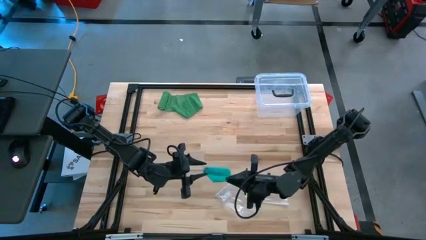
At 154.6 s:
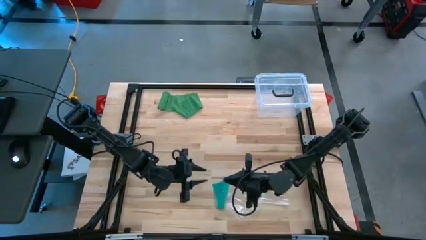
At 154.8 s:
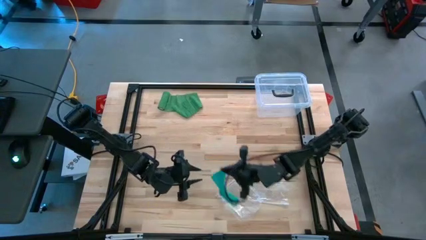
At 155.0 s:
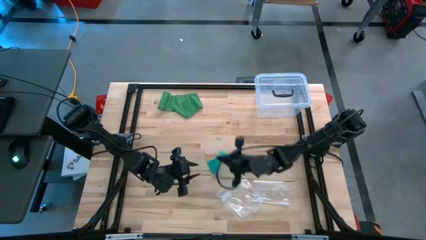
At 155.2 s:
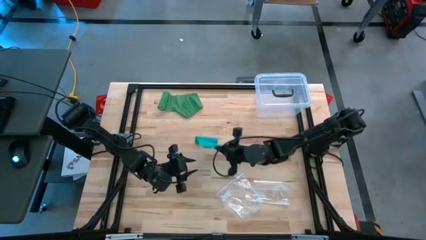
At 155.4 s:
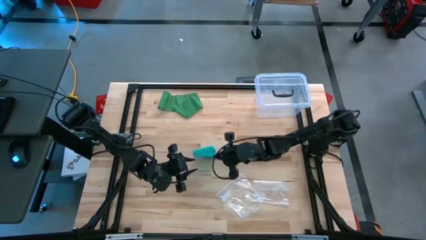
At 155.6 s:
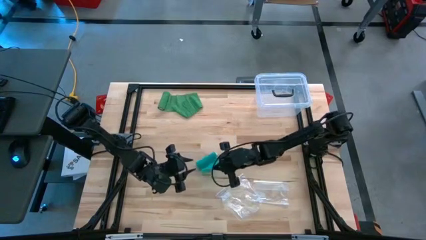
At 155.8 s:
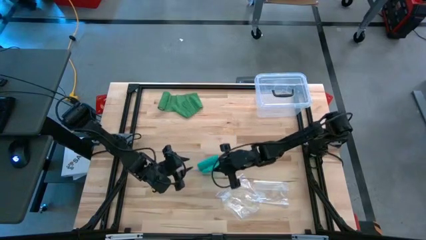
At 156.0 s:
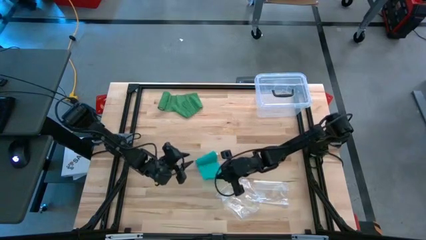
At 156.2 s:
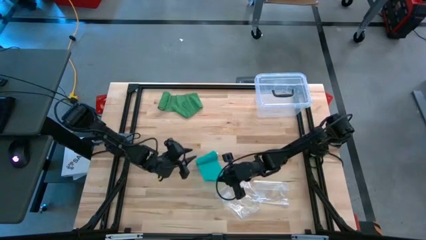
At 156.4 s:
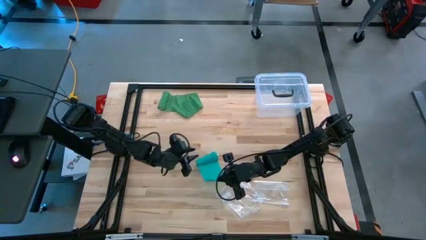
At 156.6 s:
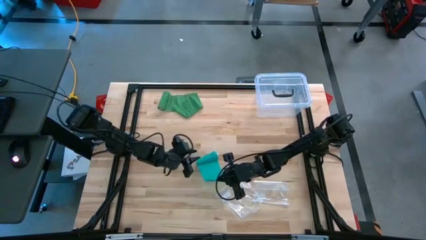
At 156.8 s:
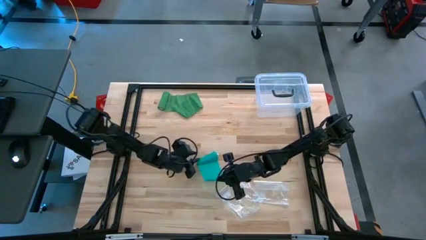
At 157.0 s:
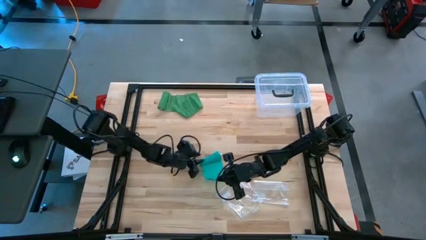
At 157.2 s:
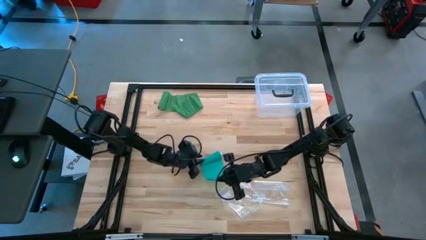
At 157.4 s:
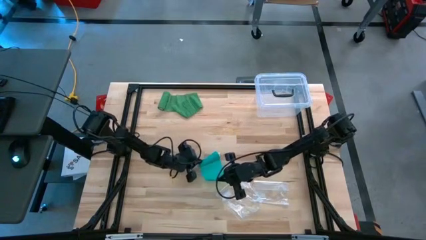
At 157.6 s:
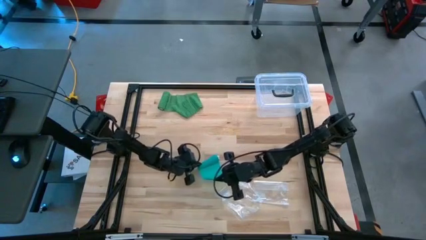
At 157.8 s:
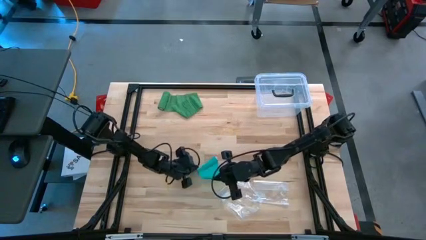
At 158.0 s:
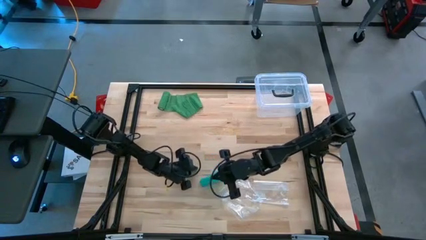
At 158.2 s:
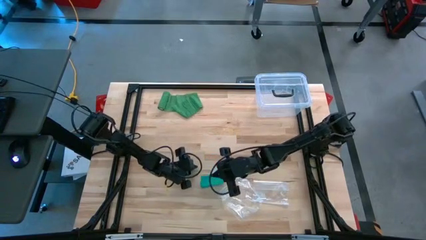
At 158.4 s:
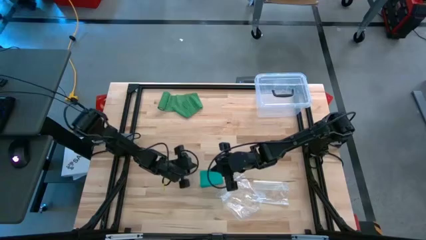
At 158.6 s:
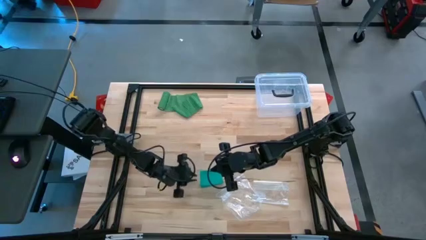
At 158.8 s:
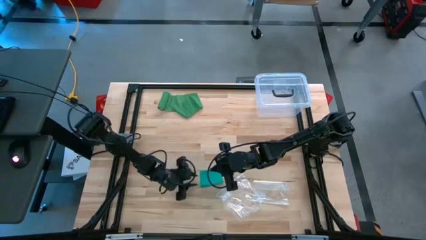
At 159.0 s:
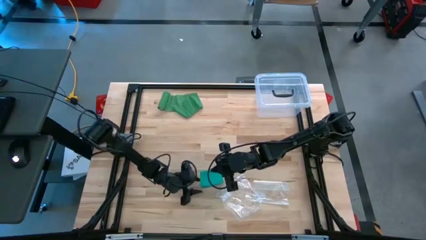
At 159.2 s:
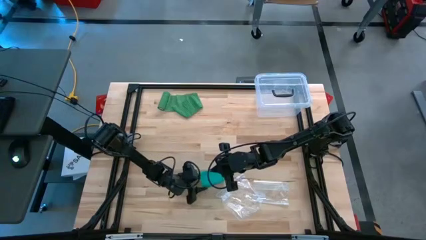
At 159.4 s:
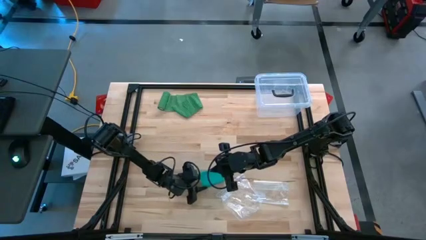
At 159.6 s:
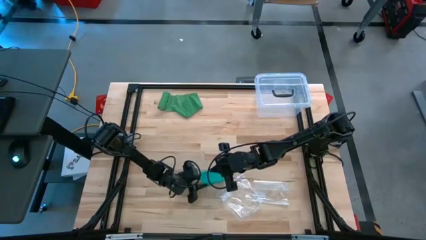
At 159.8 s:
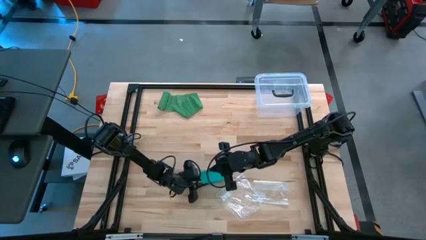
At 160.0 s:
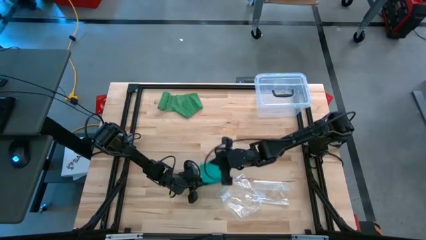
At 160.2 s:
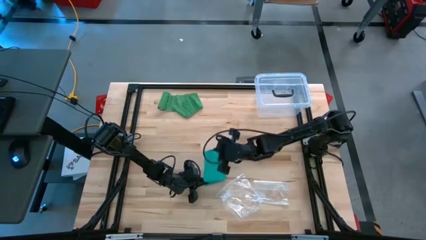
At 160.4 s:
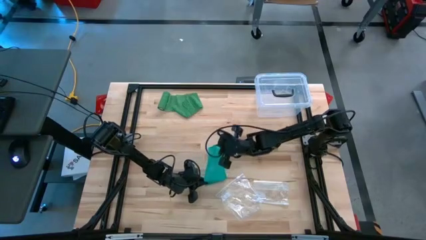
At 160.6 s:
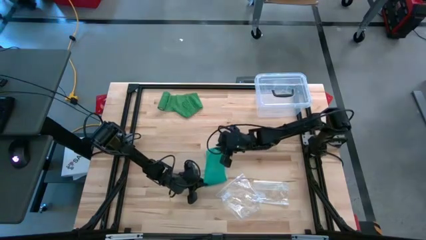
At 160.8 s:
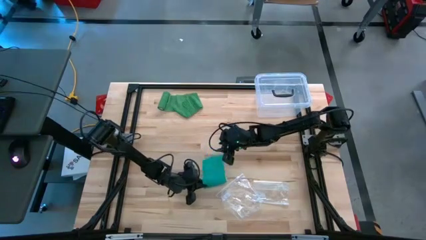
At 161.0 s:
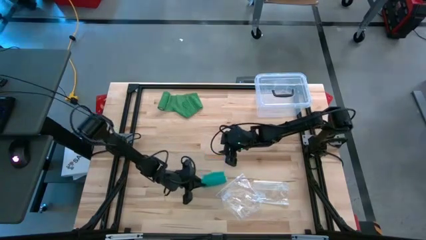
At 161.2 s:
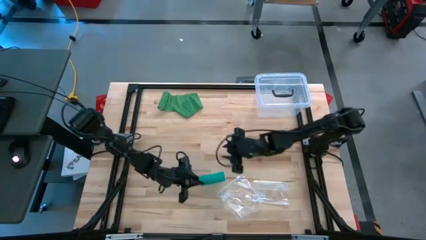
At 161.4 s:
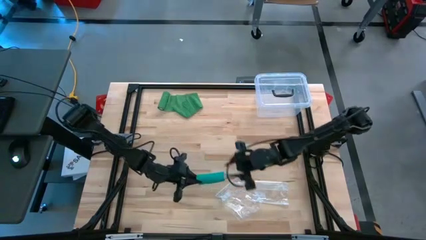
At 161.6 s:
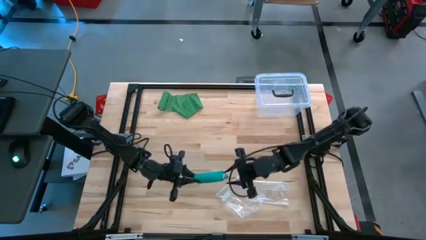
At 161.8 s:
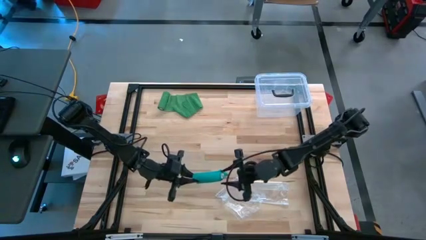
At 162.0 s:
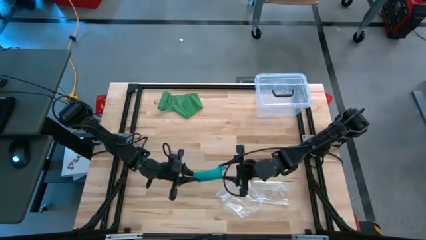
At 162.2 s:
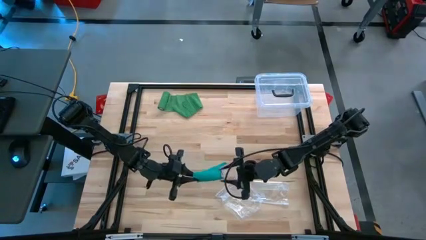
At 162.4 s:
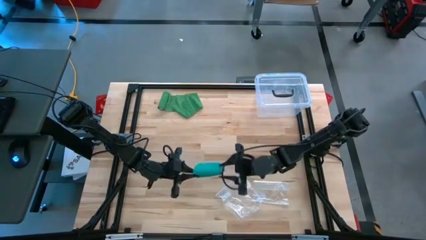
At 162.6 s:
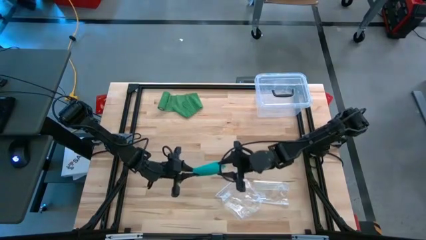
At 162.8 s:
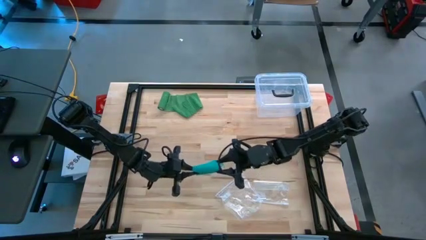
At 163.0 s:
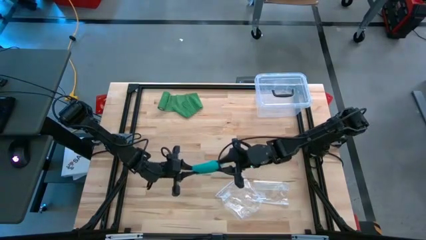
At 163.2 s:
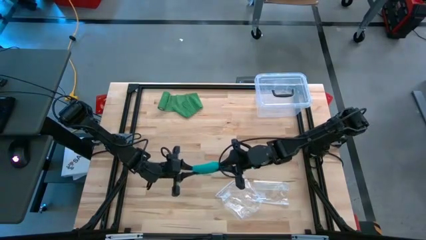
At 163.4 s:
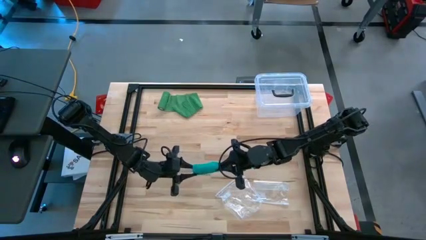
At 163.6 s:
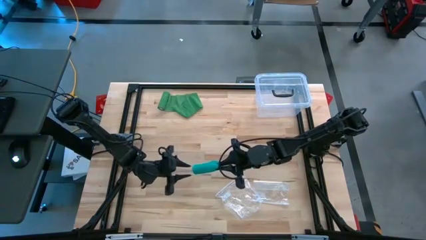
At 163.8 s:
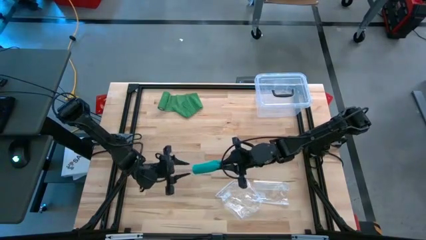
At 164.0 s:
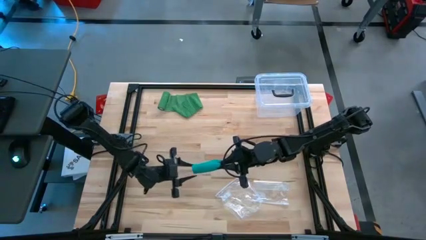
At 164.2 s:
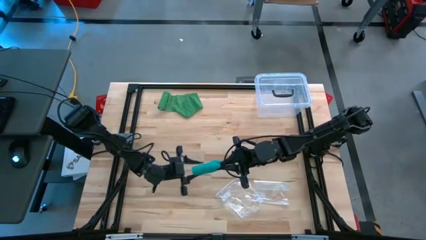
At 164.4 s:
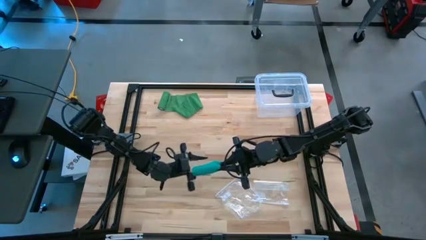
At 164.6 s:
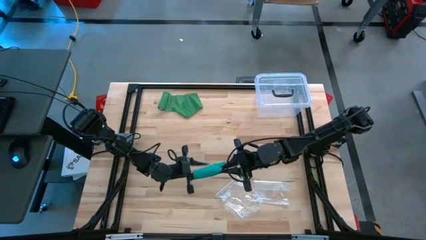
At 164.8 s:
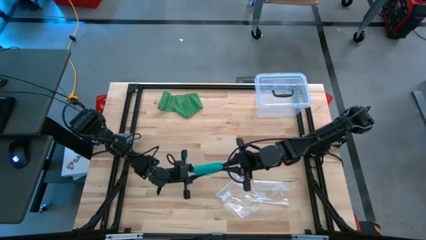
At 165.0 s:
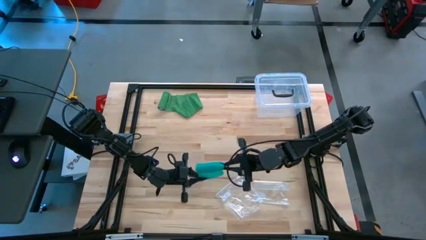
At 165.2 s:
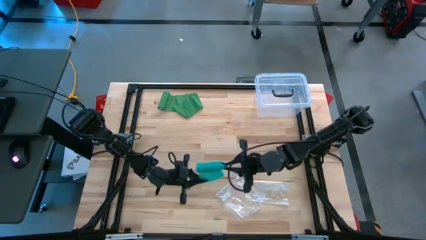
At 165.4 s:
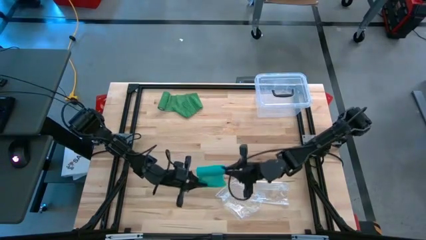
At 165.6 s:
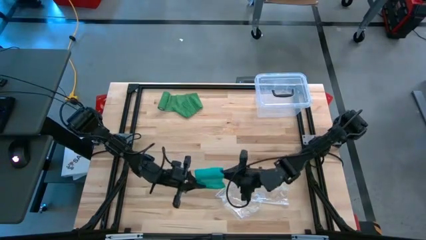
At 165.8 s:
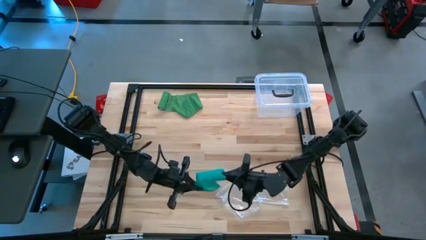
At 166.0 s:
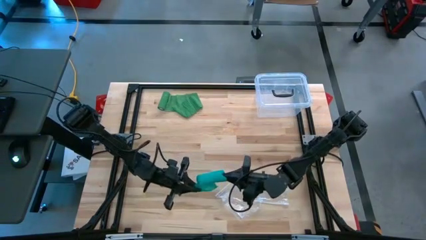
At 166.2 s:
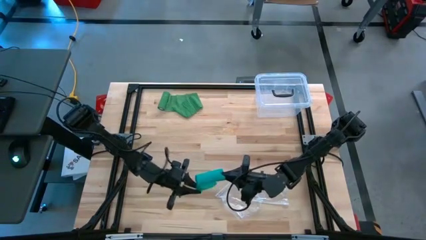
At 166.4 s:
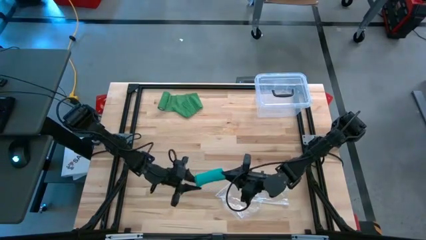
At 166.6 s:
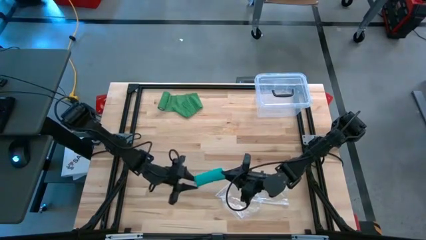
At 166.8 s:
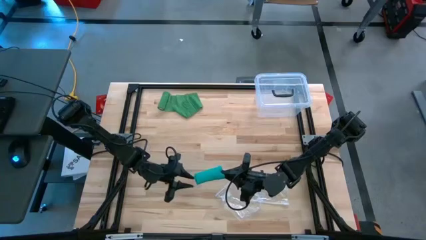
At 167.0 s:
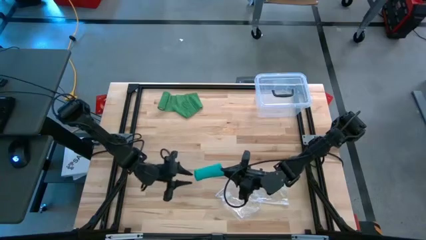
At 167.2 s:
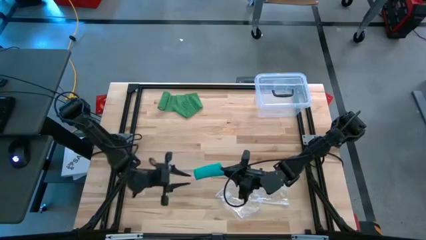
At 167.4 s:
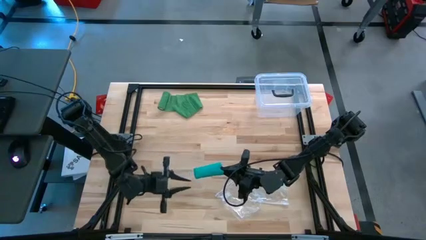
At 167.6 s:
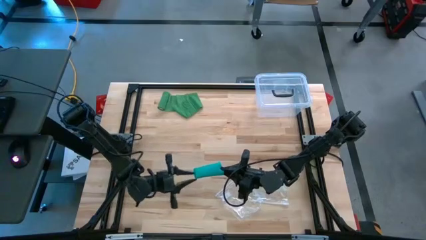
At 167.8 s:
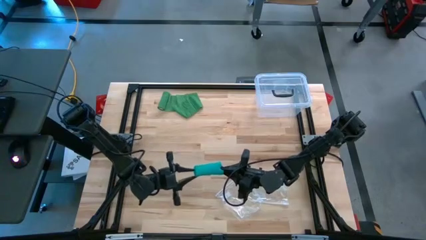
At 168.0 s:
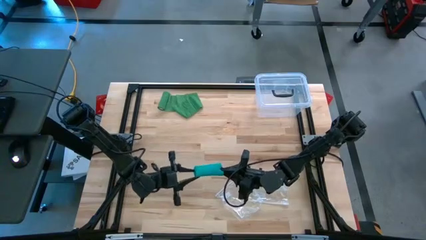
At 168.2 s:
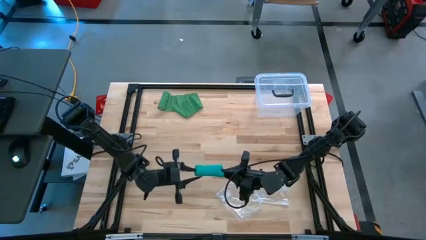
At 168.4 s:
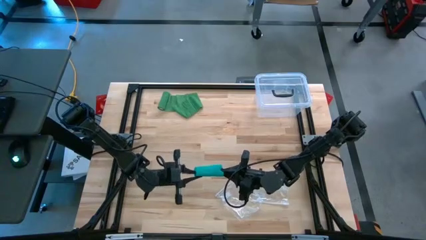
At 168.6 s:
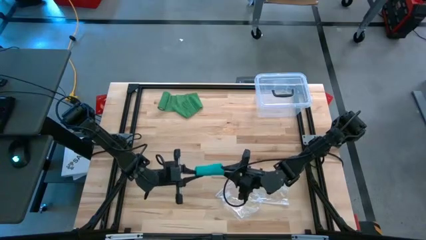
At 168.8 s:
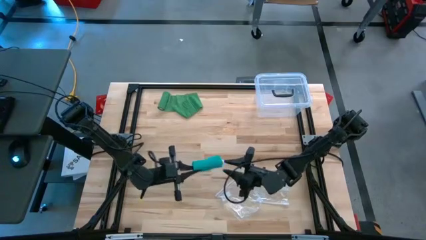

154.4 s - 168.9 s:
Task: Roll bandage
Roll the blue bandage

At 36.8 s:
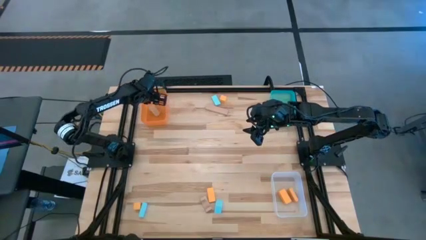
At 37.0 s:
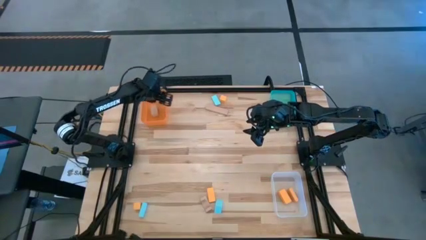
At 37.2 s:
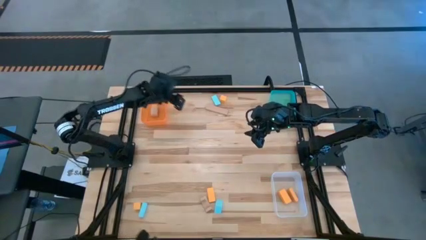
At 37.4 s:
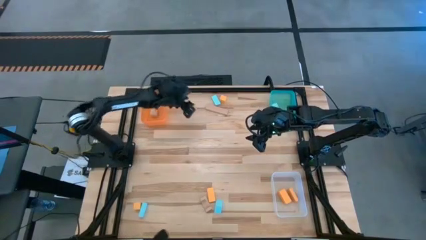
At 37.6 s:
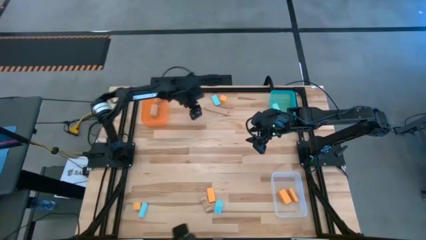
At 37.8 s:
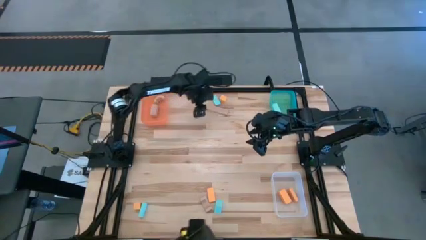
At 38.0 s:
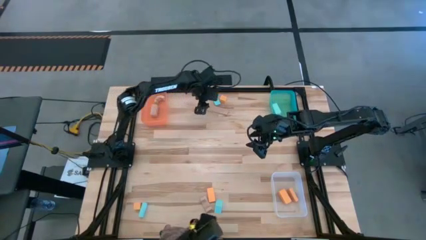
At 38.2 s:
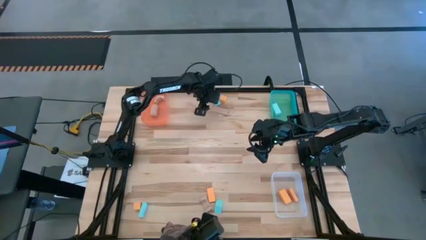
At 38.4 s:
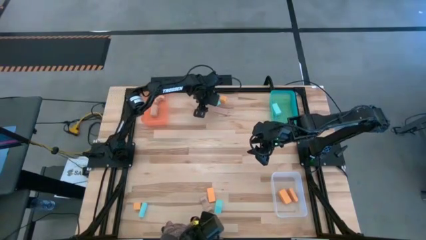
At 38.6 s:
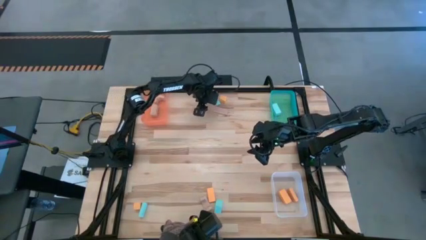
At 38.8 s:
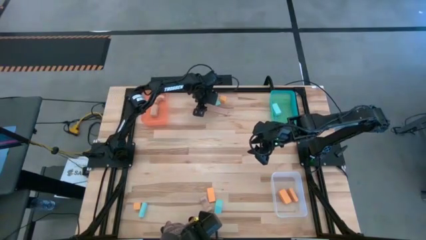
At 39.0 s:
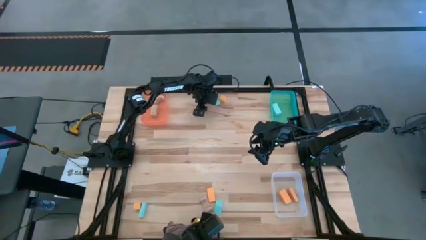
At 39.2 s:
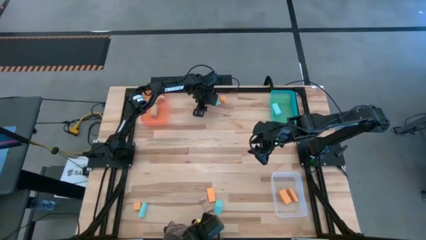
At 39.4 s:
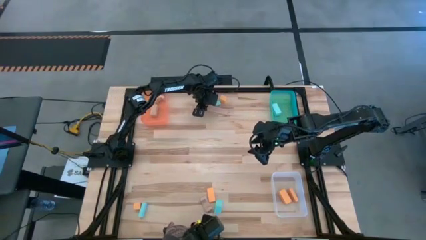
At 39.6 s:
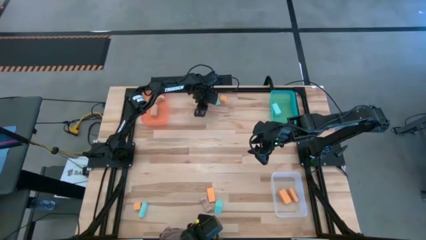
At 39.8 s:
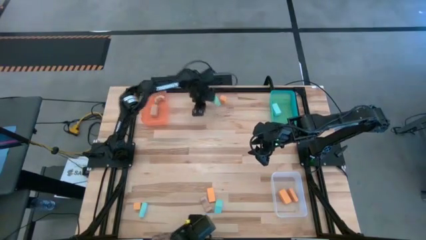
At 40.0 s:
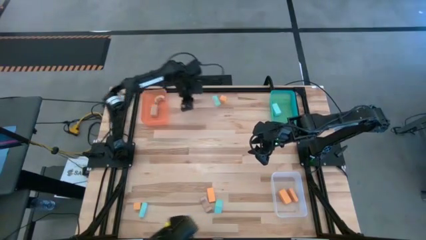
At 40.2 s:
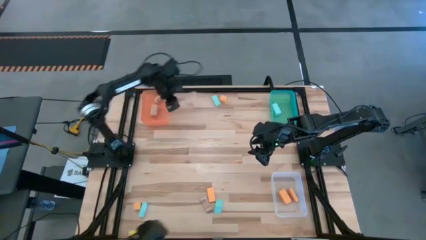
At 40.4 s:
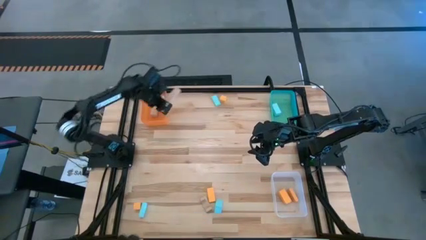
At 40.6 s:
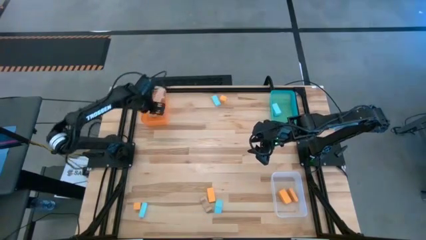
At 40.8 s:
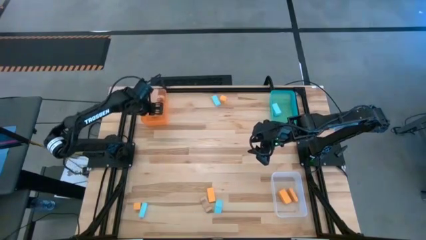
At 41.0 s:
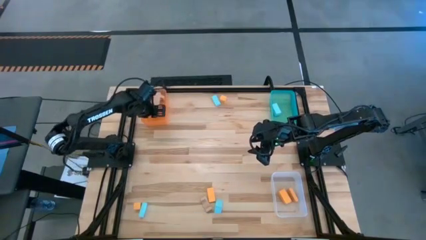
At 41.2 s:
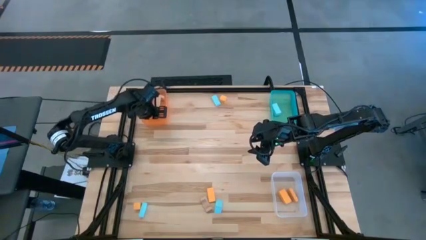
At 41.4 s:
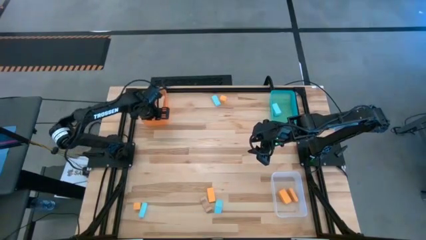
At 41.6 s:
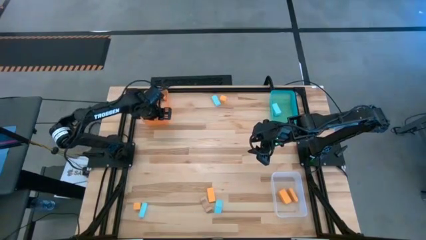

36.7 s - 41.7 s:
Task: Sort & place blocks by color
Put the brown block into the orange bin
